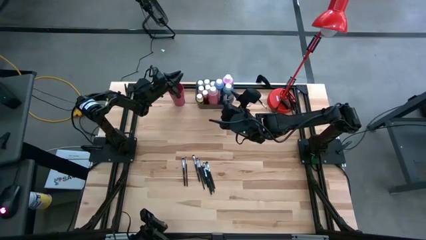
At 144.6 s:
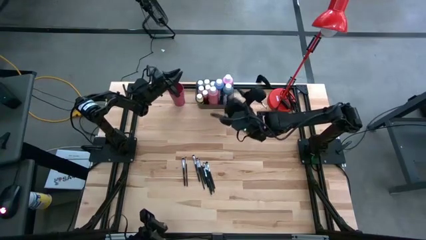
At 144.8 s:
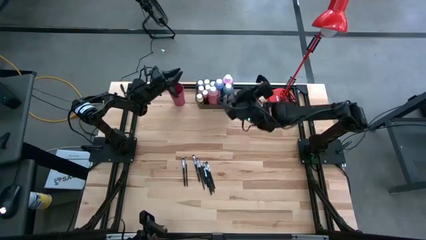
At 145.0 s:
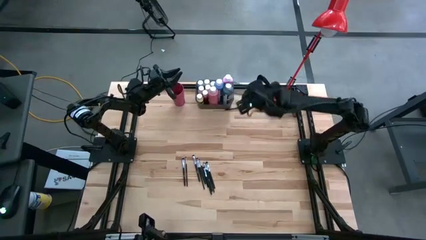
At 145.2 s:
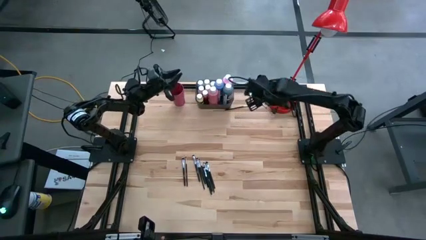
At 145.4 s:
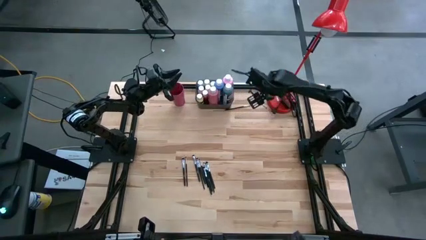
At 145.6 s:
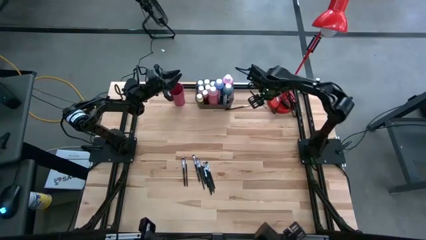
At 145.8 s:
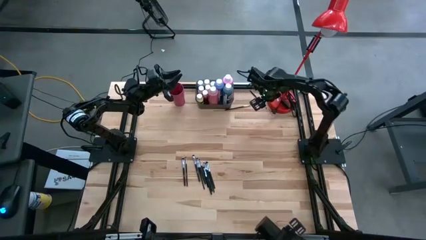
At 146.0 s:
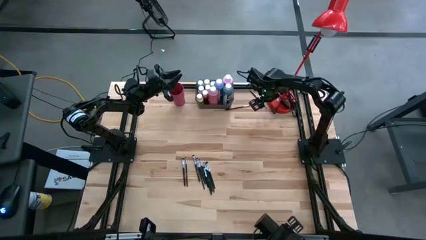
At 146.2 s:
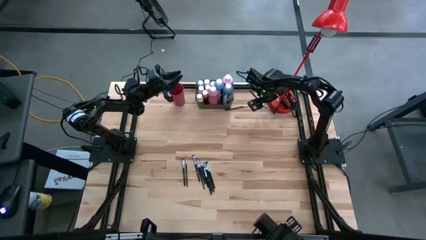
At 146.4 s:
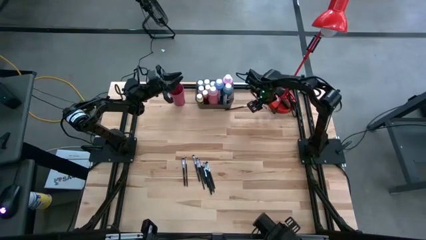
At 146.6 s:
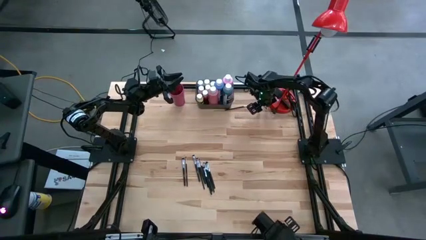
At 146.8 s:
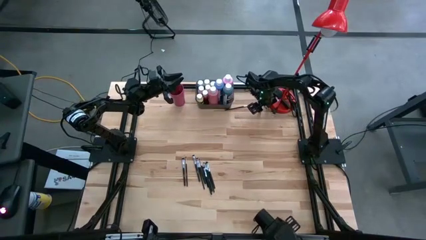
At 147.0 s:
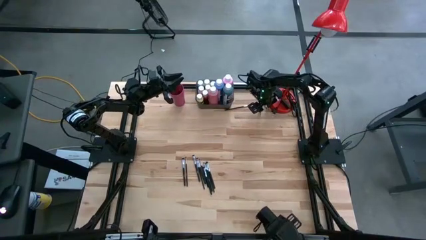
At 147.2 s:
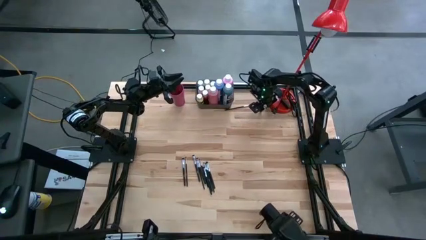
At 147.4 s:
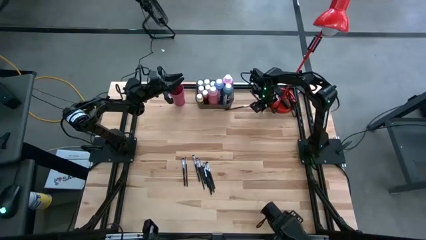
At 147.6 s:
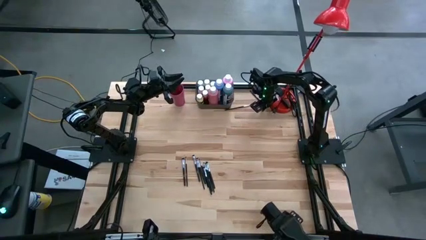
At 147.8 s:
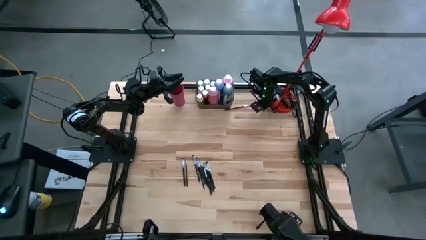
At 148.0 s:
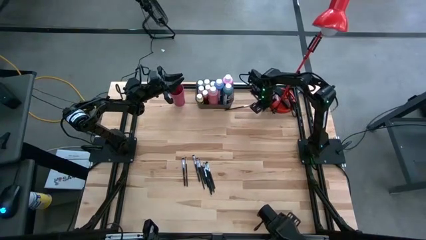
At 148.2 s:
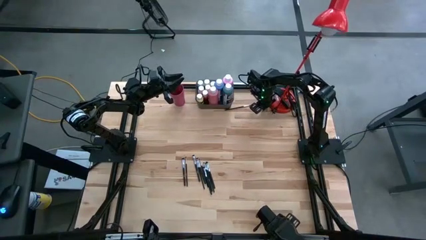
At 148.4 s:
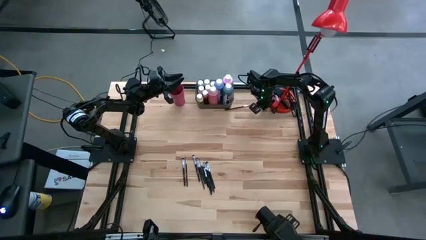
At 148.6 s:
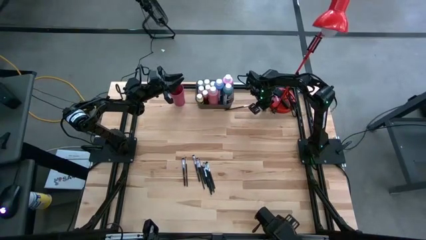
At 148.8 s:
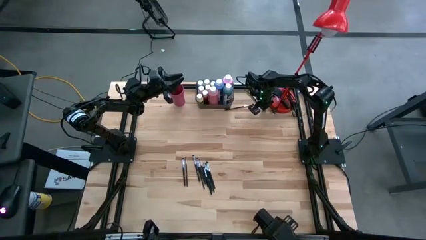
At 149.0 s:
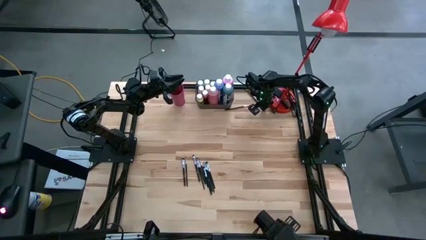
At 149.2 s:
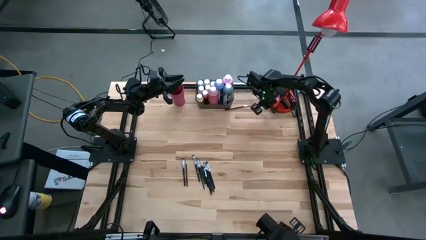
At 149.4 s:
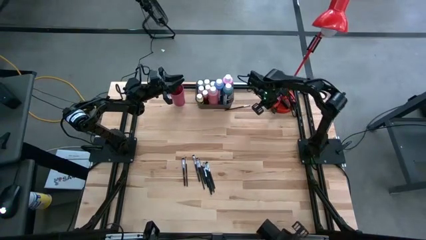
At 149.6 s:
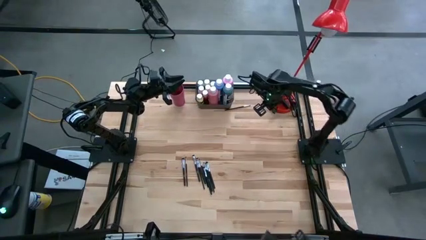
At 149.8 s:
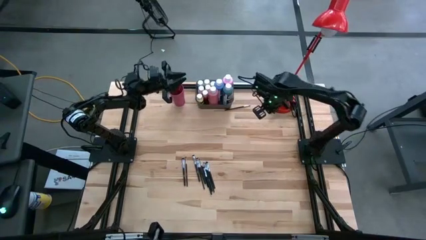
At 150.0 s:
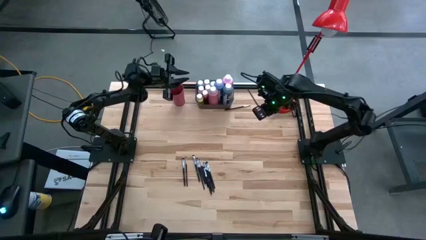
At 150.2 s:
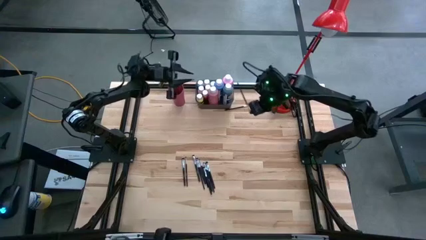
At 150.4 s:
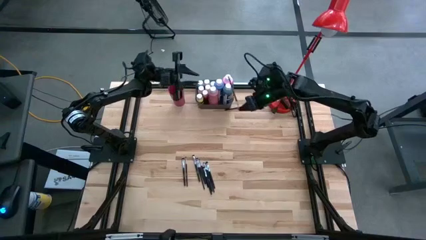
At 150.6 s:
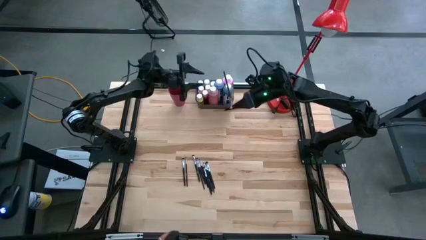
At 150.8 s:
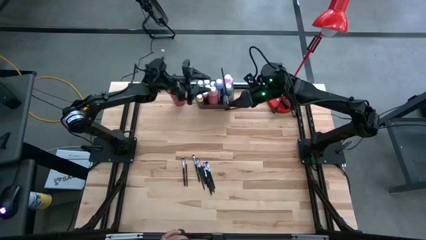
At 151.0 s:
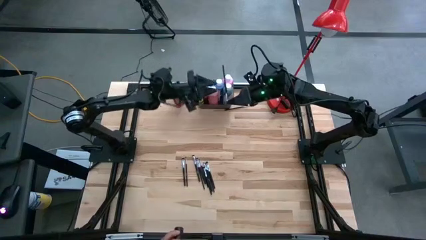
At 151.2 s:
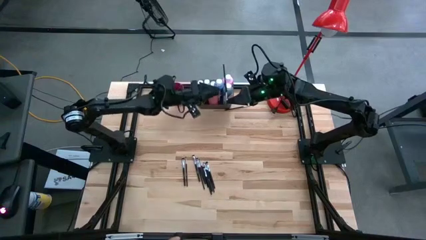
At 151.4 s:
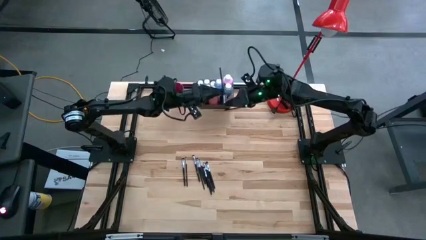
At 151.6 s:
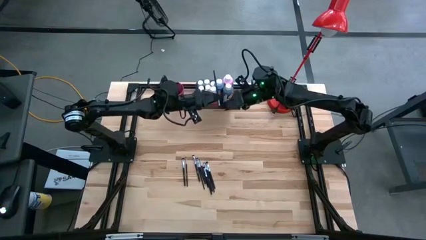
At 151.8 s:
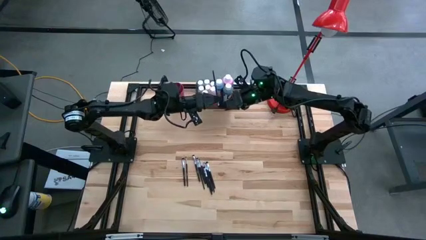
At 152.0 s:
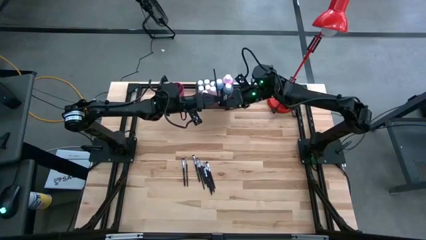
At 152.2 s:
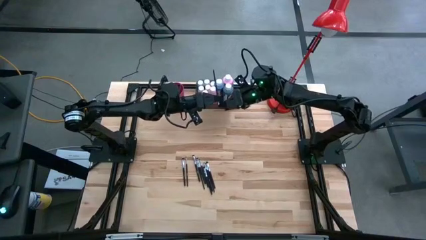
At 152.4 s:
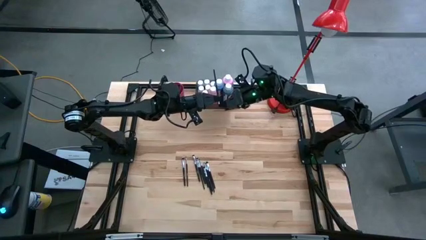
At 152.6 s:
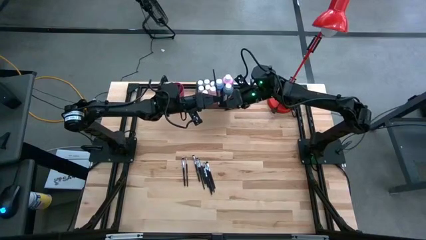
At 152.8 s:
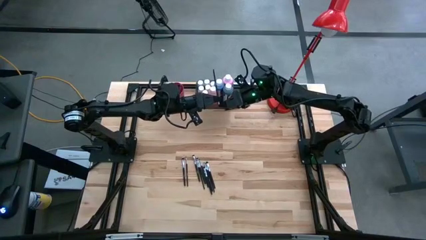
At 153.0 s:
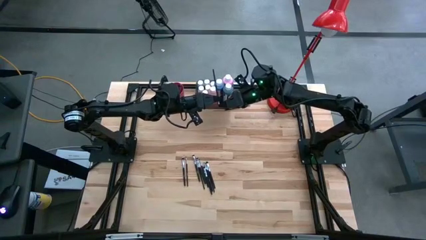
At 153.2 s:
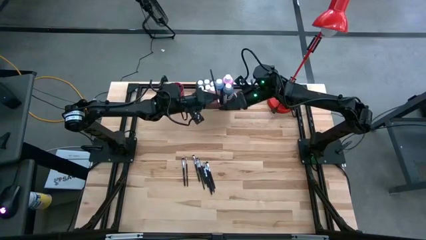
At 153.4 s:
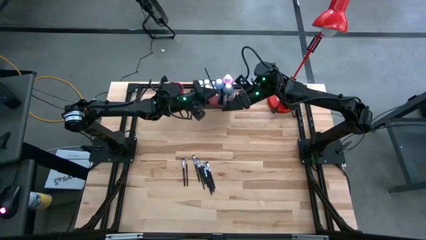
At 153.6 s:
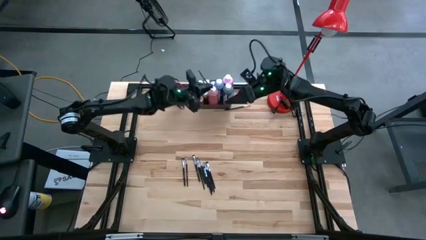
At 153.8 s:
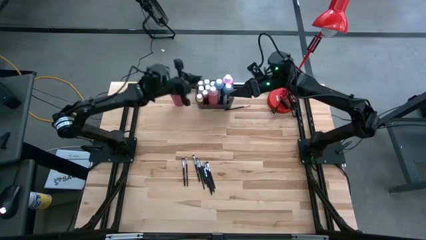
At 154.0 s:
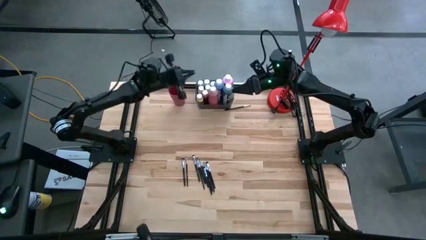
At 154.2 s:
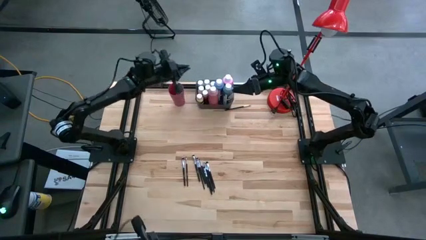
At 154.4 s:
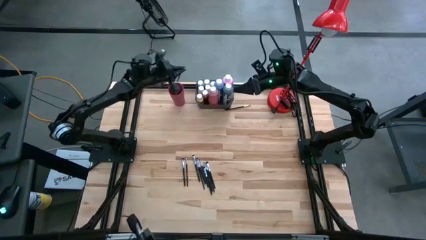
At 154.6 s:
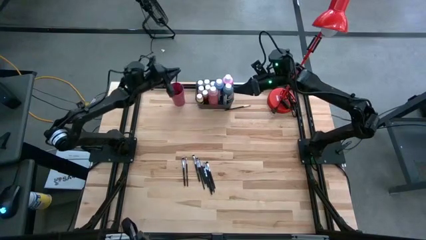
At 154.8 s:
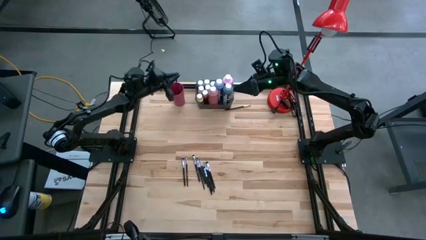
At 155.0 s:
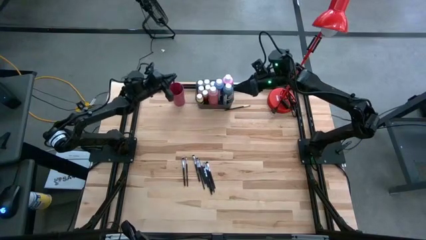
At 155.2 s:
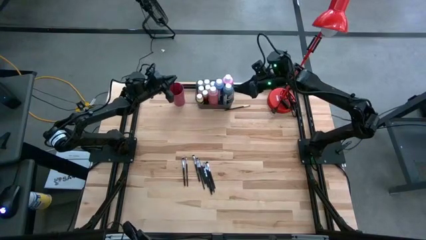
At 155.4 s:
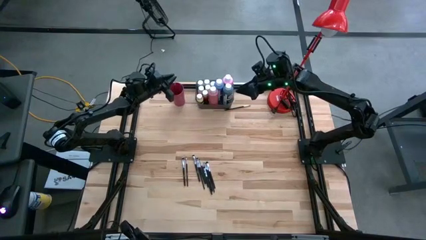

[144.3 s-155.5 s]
Task: Pick & Place Paint Supplies
Put the black paint brush into the pink cup
